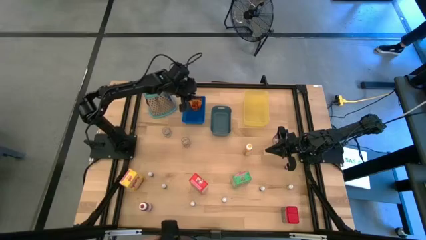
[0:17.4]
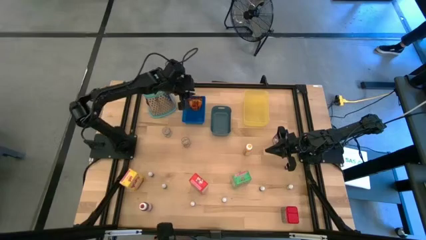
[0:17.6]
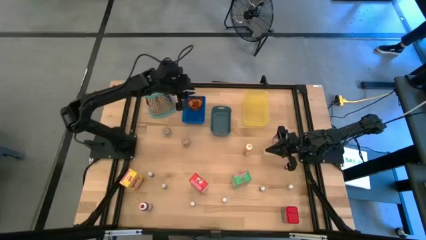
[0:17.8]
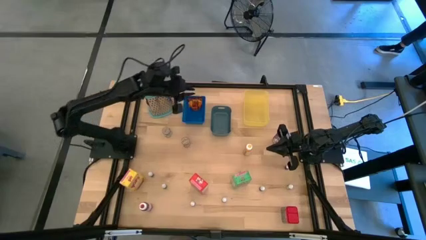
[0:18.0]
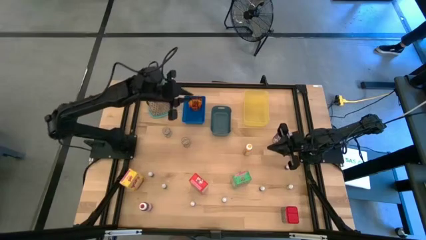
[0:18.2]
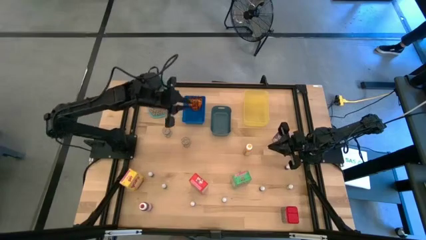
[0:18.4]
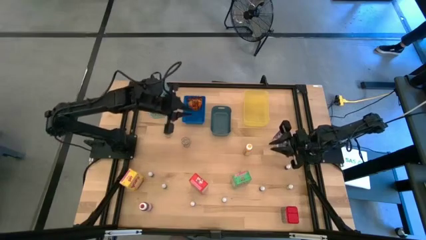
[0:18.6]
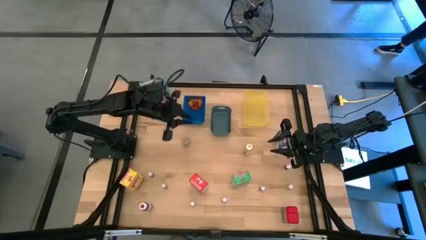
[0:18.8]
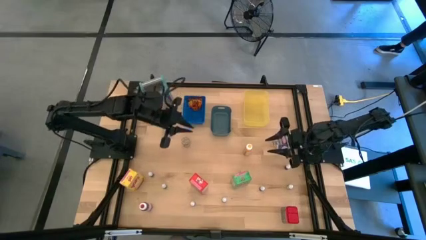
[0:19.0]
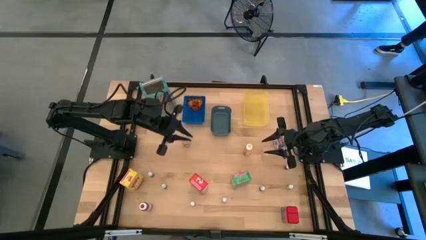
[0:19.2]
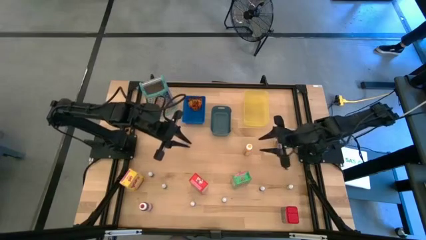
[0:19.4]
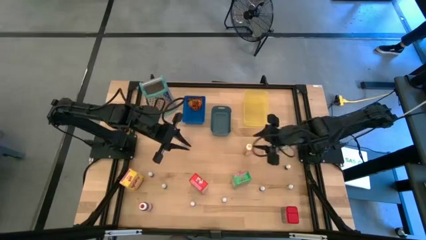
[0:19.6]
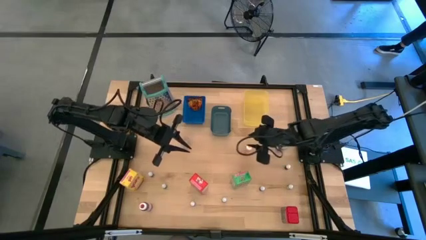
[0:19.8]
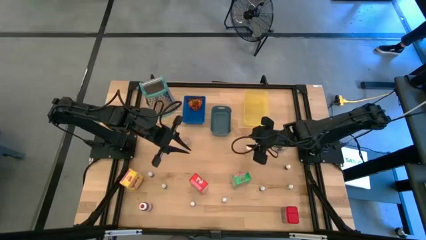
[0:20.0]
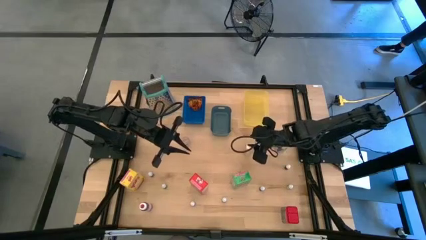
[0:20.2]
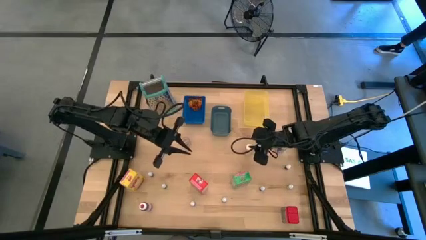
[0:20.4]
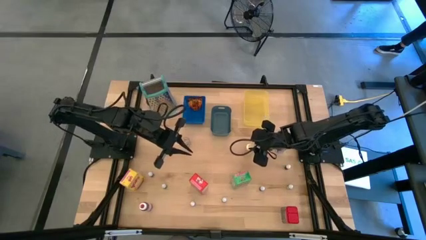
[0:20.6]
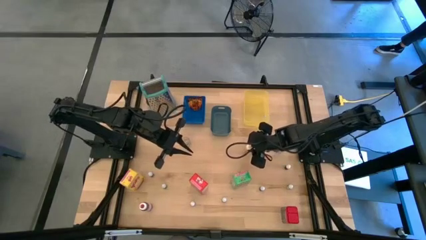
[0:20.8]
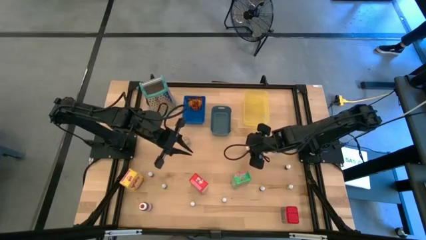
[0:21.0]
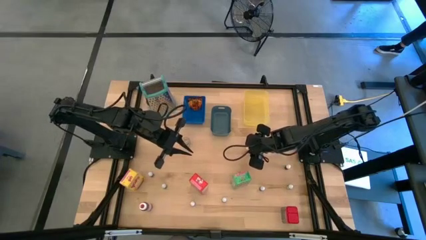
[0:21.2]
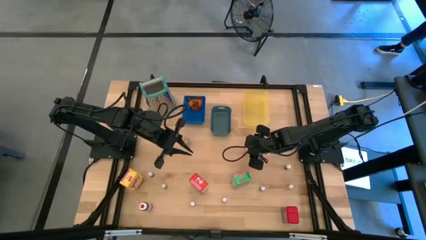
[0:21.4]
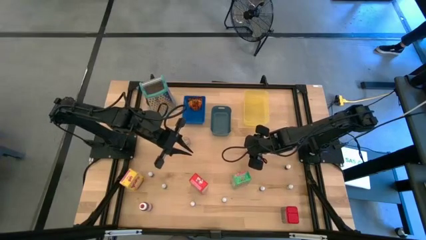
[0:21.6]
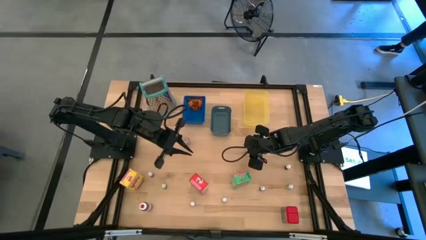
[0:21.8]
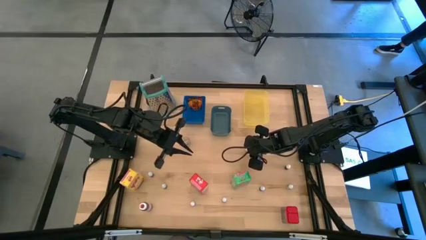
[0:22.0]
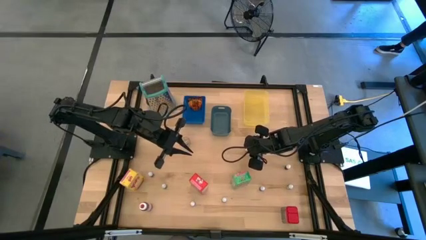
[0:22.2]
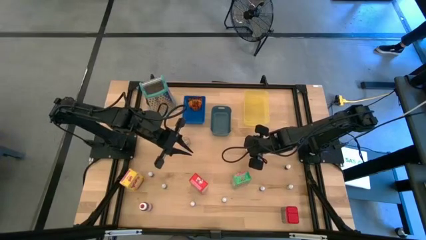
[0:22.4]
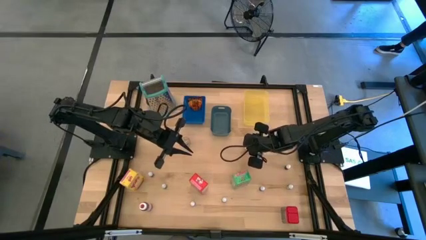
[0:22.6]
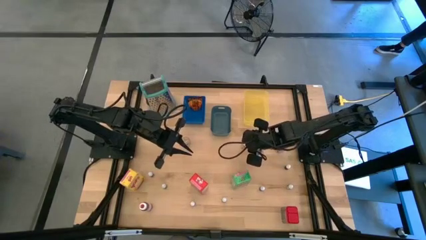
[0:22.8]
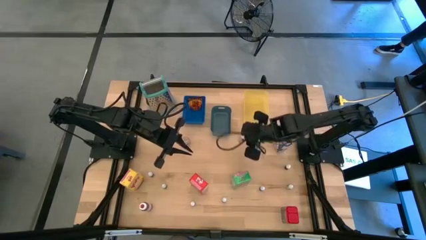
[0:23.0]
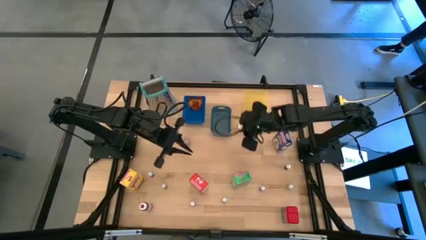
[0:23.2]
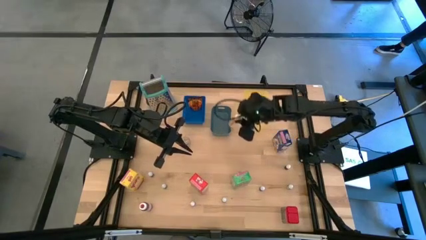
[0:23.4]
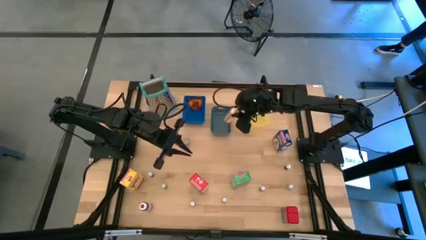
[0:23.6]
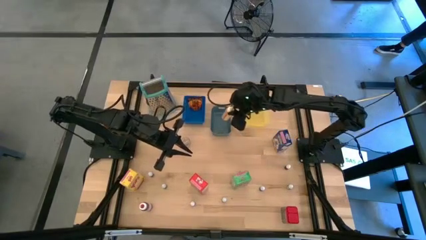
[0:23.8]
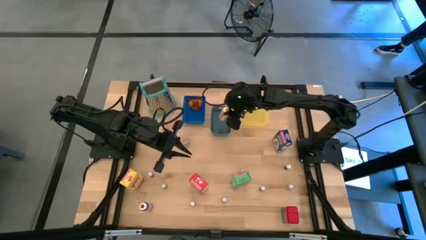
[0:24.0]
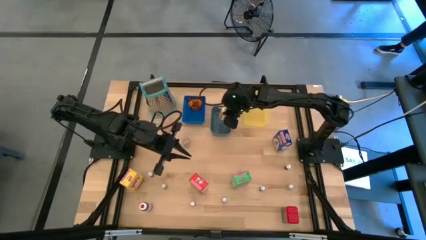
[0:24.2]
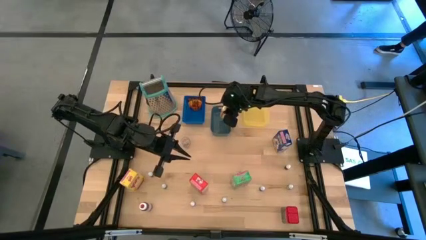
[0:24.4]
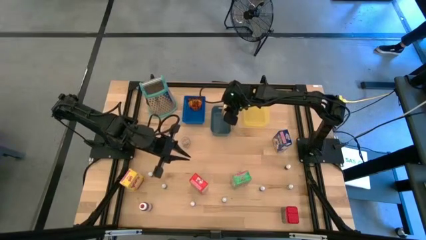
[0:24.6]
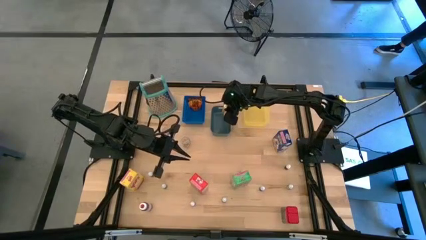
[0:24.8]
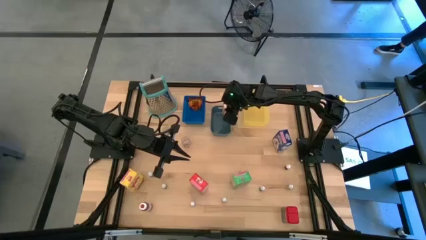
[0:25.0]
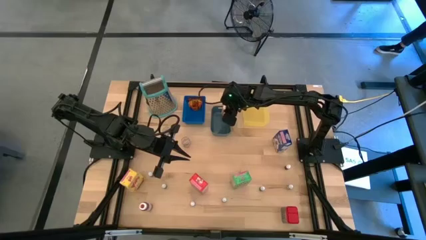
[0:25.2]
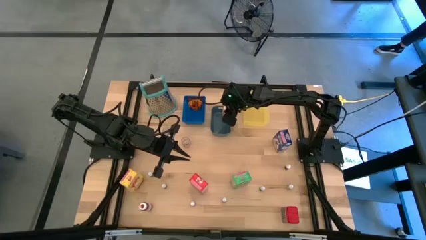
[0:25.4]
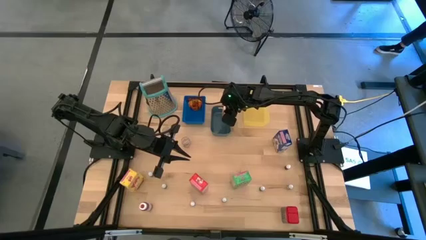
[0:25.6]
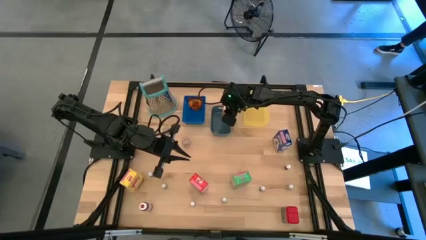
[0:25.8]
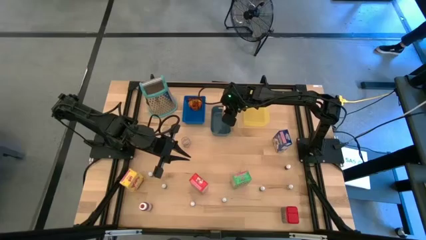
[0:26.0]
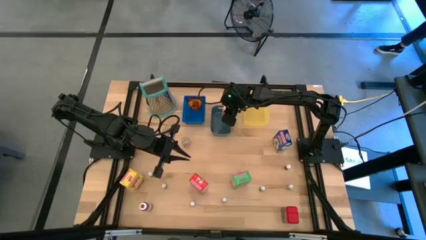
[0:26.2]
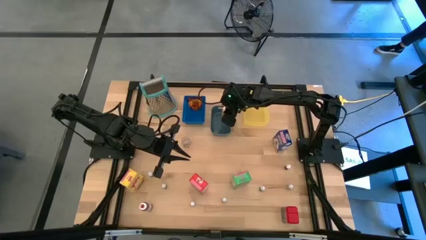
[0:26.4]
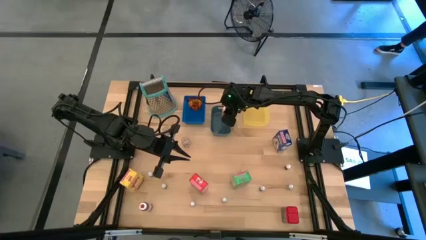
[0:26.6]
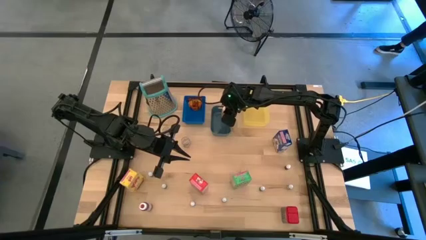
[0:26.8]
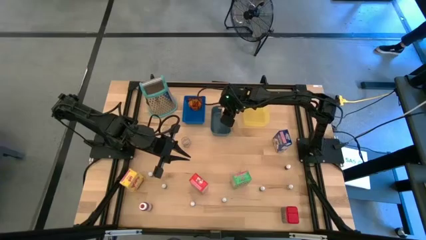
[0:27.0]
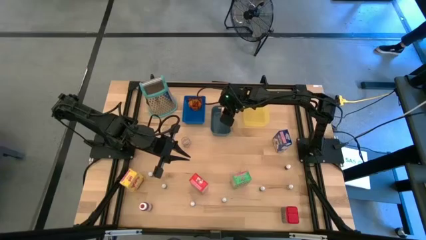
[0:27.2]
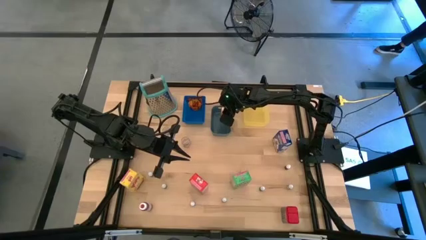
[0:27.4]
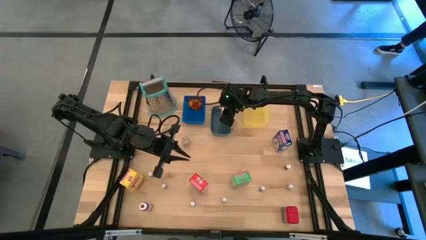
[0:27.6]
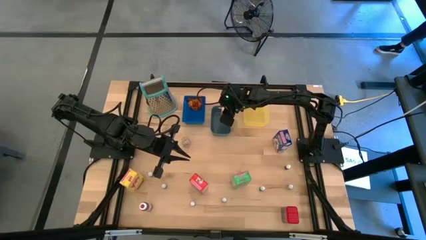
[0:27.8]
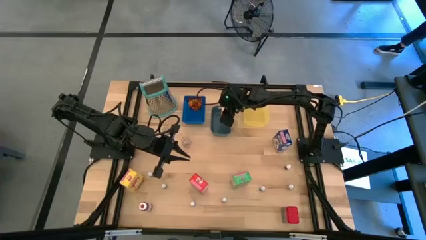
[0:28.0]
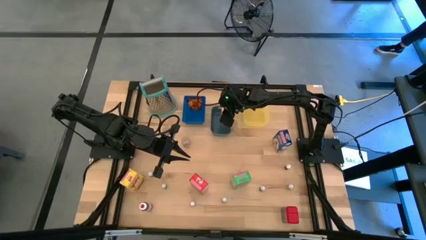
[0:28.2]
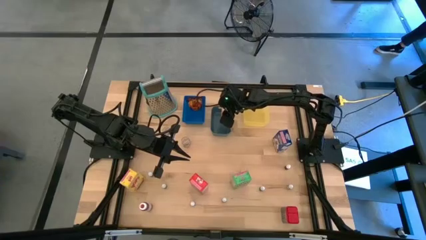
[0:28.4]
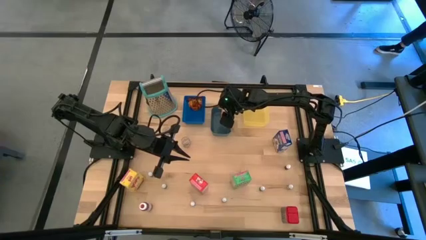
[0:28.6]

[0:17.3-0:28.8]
Task: Pick & Place Kitchen Items
Put the big yellow food coloring bottle into the dark green bin

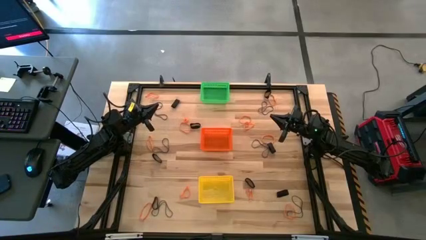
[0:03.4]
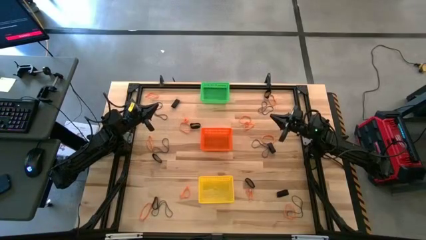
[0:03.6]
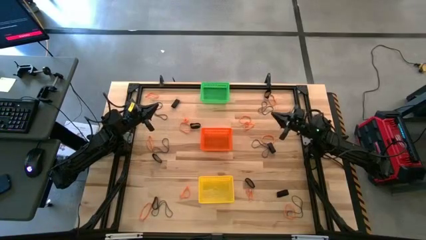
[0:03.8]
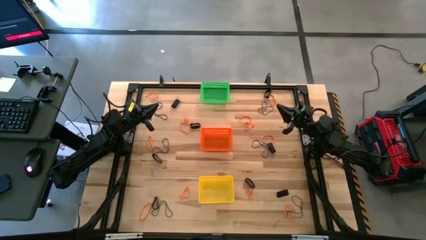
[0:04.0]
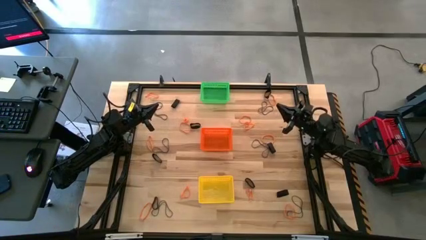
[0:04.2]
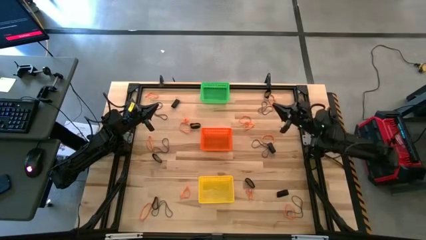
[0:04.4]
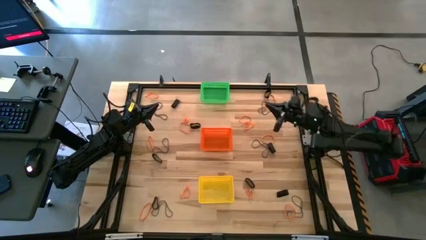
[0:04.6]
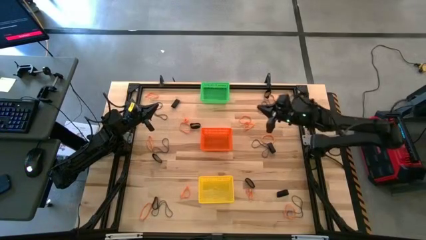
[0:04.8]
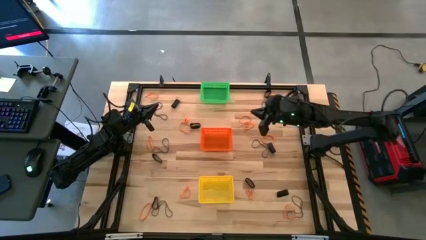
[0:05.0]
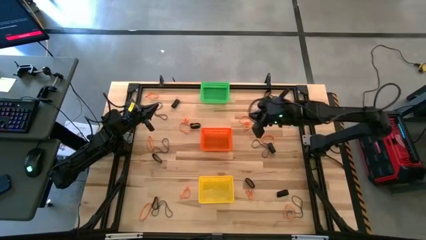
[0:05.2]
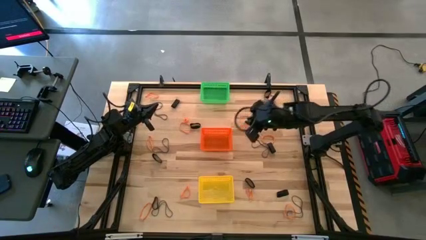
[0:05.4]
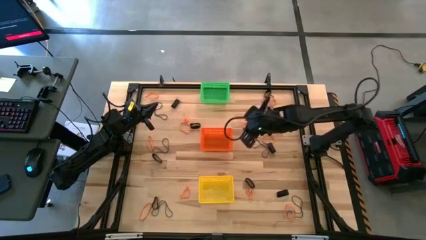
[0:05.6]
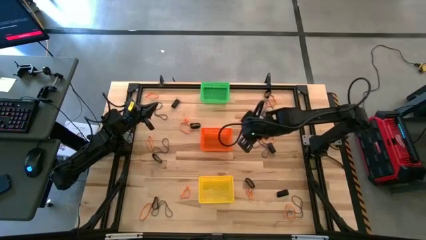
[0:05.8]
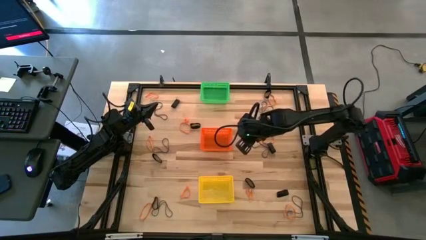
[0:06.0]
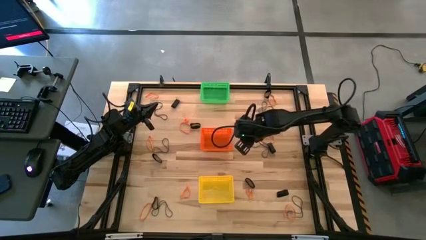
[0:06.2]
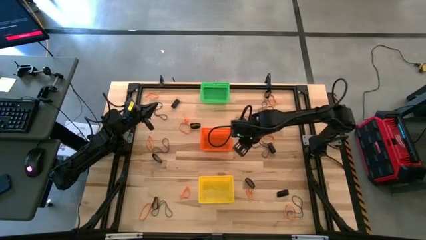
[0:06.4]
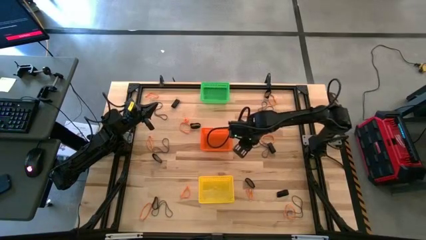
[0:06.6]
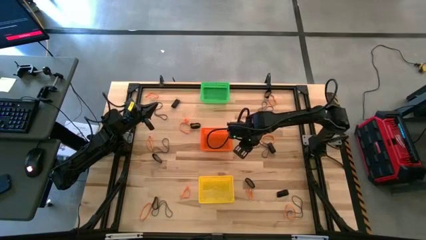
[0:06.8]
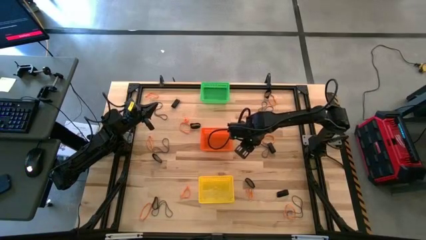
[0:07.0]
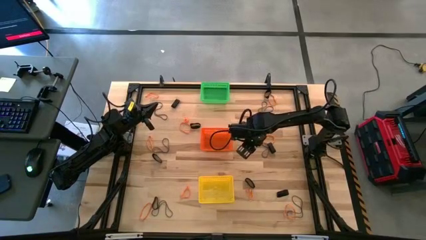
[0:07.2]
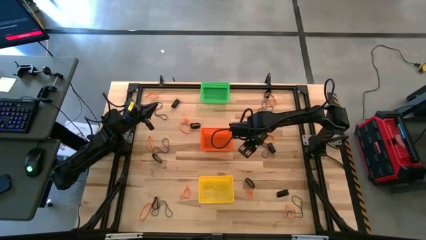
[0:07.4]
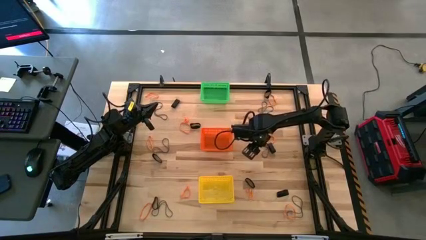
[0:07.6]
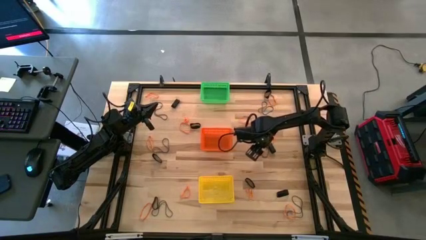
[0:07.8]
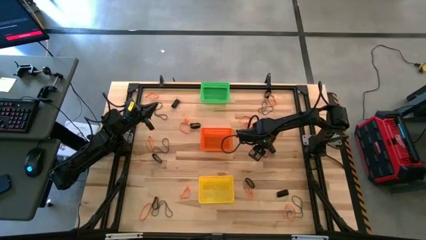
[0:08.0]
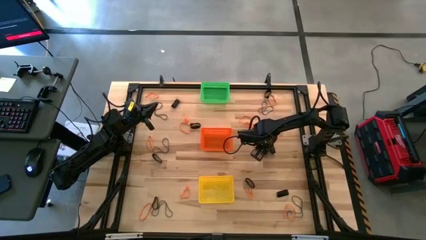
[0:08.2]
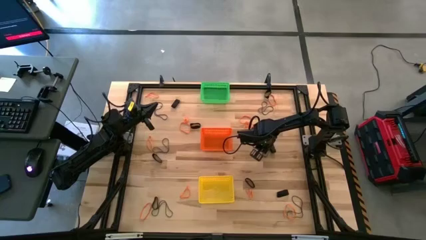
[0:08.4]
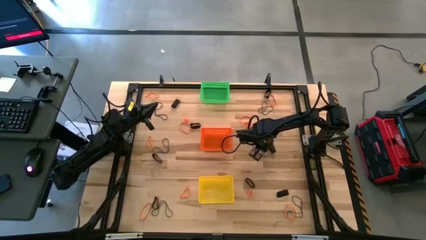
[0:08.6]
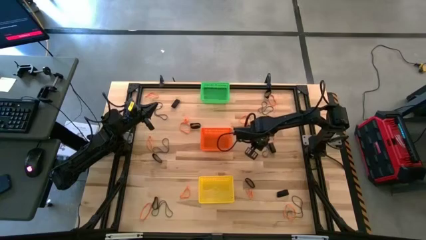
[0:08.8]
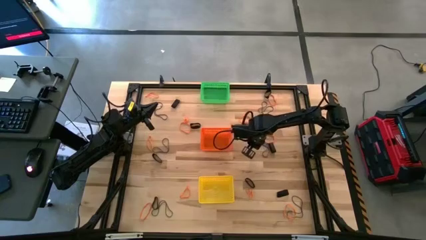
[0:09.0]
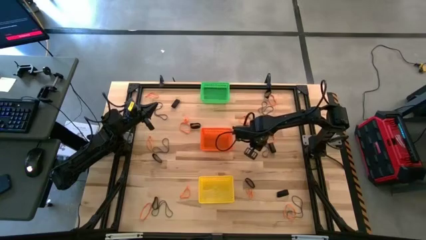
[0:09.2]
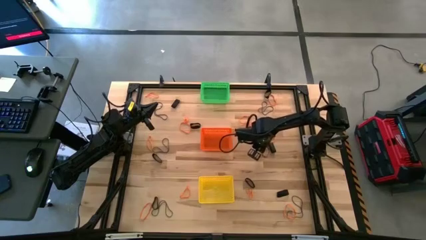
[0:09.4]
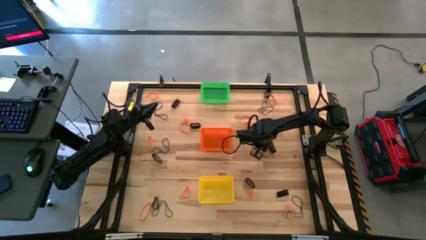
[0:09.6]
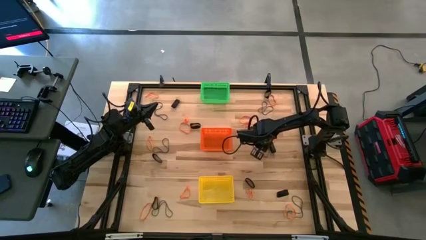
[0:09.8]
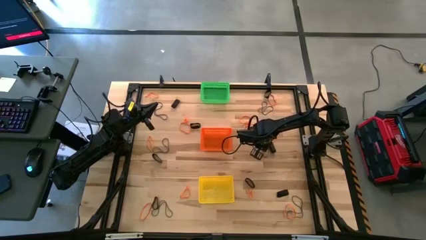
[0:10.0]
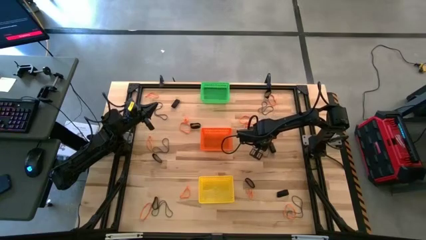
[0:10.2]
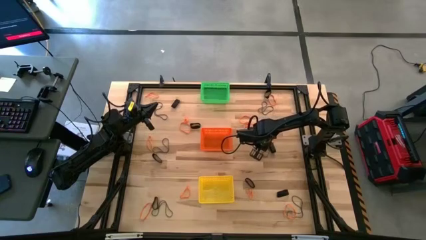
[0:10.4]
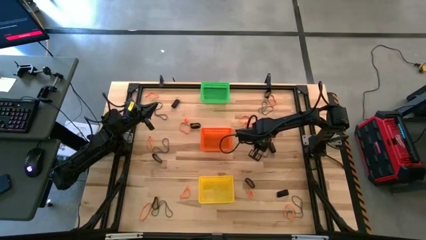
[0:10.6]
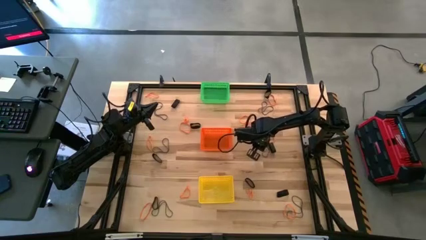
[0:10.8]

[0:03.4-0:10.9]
Task: Sort rubber bands into baskets
Put the purple rubber band into the orange bin
